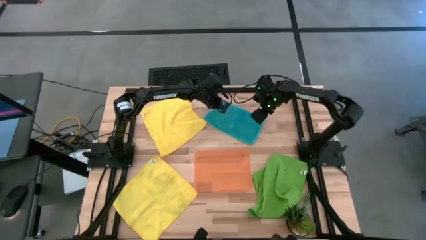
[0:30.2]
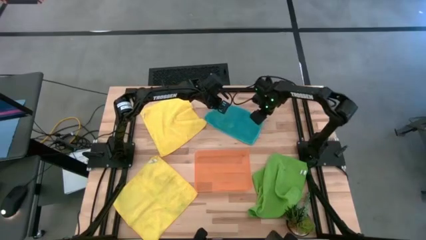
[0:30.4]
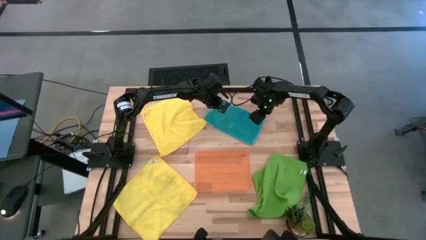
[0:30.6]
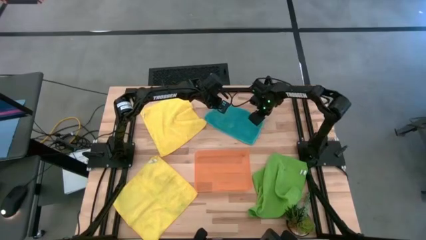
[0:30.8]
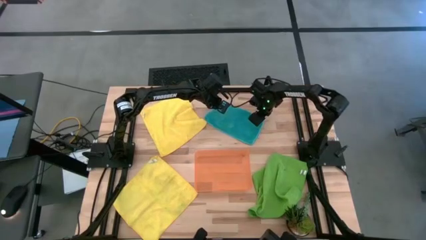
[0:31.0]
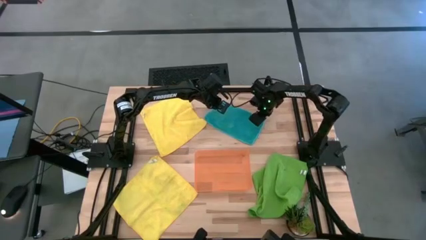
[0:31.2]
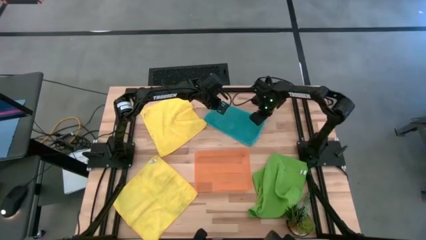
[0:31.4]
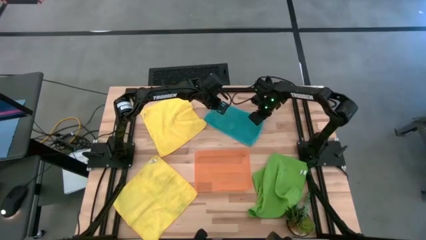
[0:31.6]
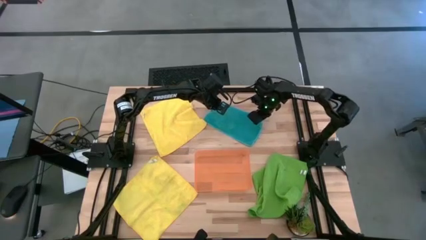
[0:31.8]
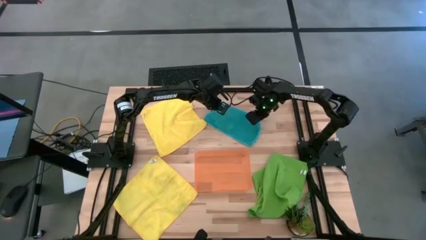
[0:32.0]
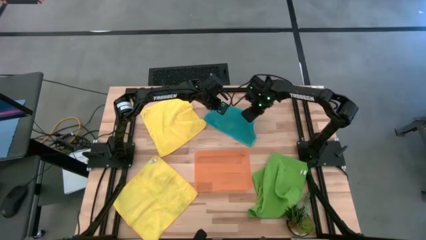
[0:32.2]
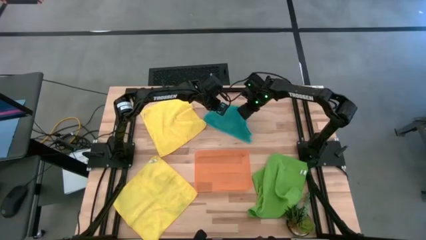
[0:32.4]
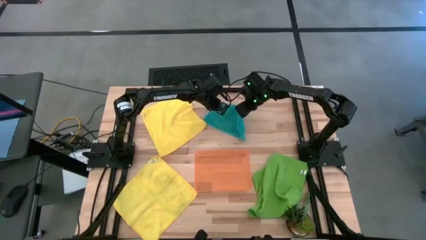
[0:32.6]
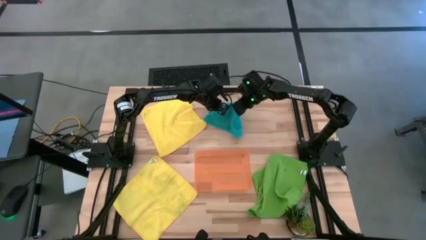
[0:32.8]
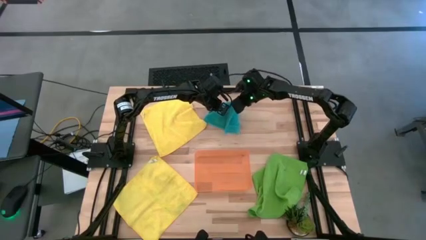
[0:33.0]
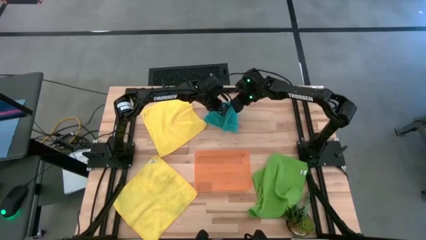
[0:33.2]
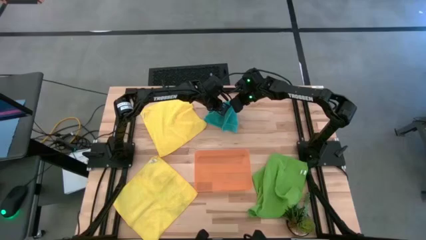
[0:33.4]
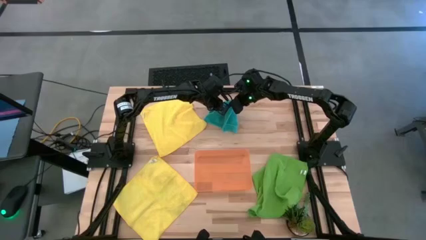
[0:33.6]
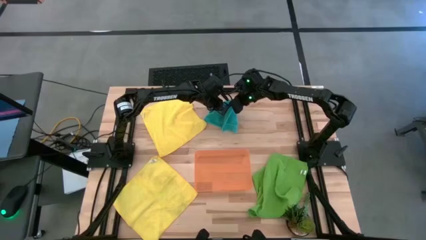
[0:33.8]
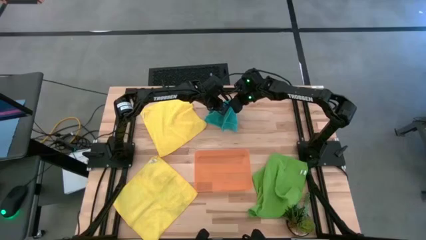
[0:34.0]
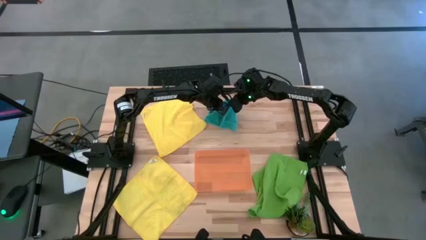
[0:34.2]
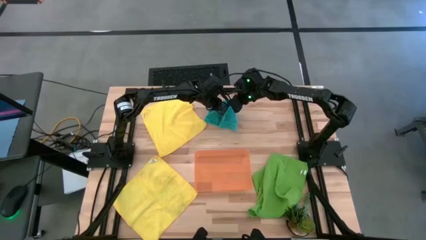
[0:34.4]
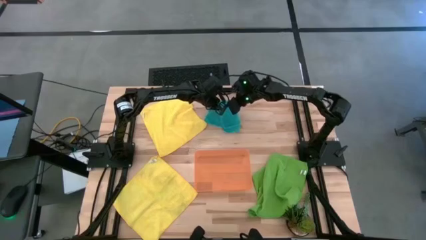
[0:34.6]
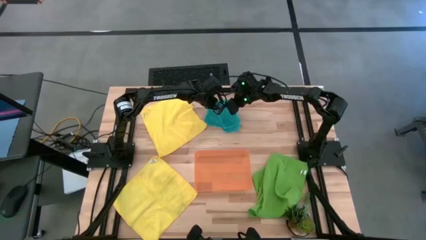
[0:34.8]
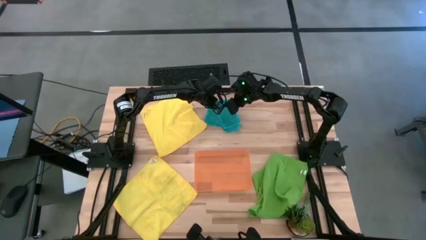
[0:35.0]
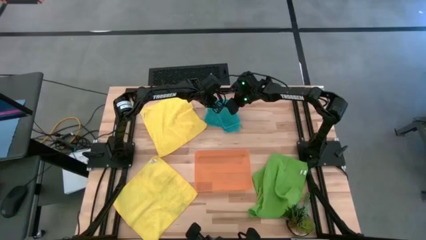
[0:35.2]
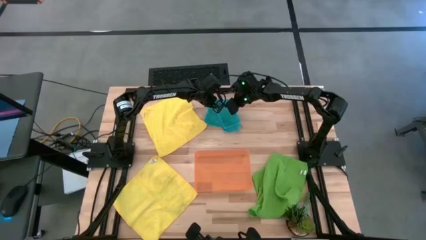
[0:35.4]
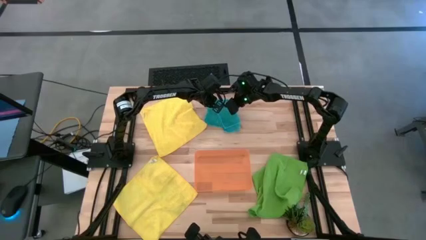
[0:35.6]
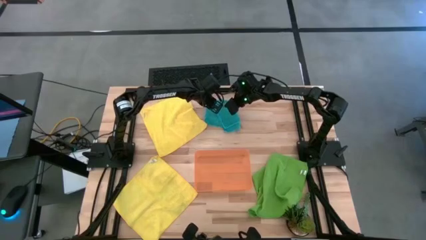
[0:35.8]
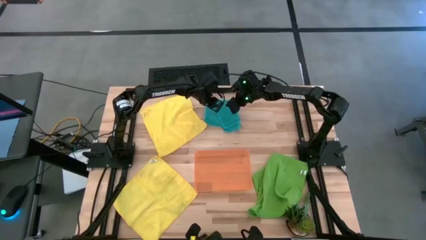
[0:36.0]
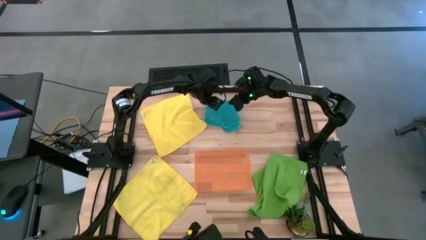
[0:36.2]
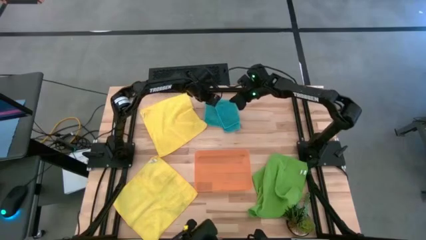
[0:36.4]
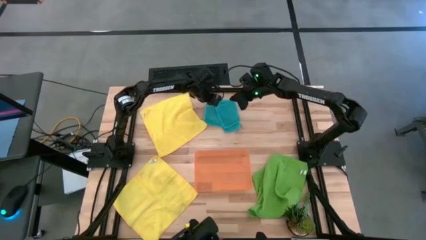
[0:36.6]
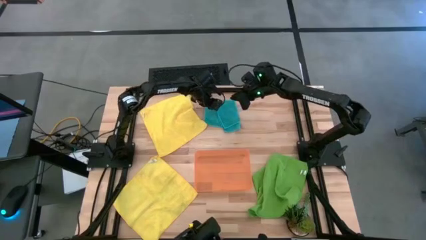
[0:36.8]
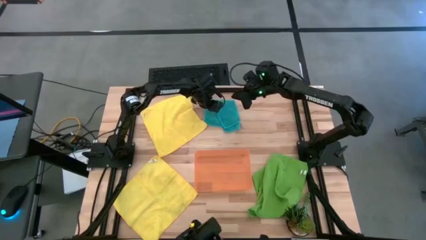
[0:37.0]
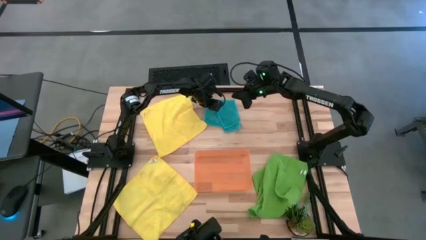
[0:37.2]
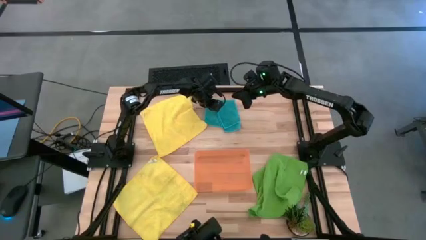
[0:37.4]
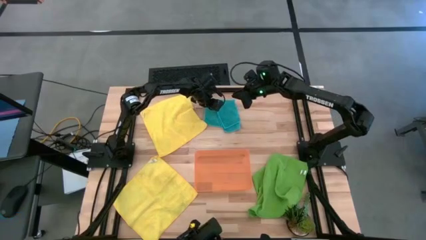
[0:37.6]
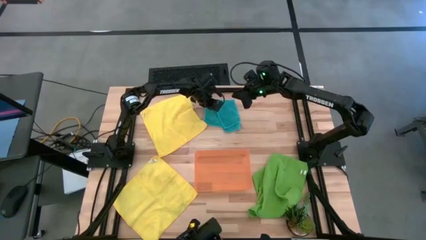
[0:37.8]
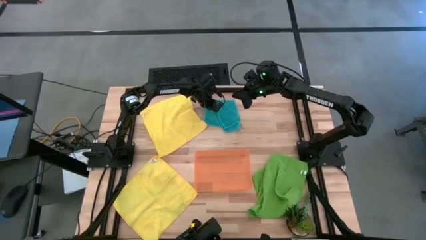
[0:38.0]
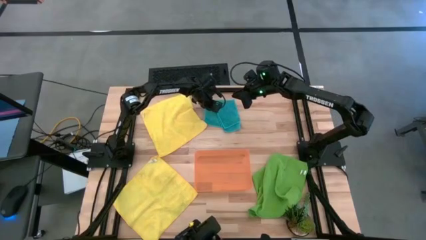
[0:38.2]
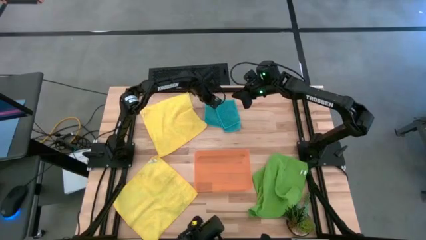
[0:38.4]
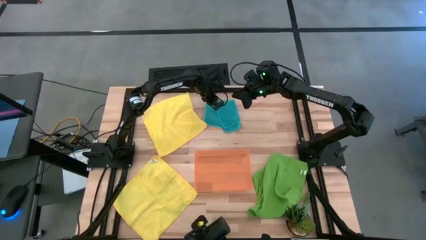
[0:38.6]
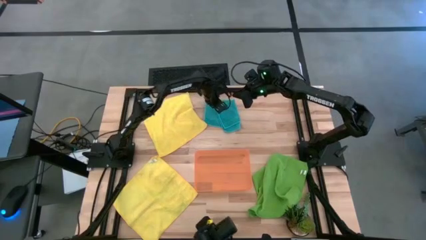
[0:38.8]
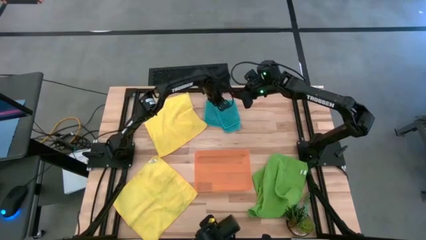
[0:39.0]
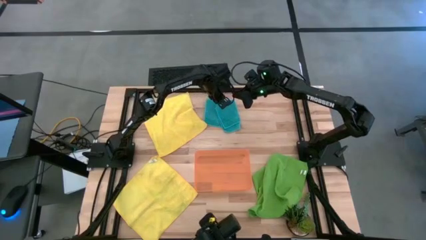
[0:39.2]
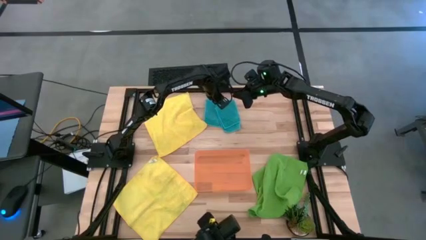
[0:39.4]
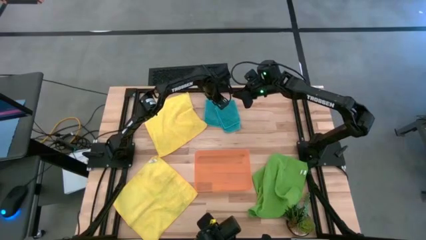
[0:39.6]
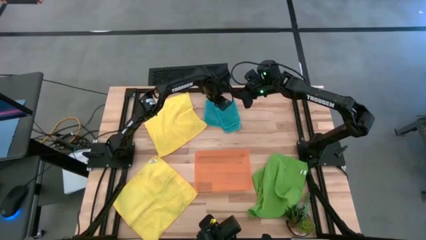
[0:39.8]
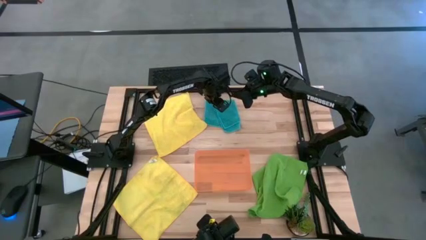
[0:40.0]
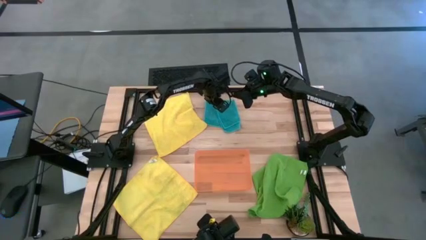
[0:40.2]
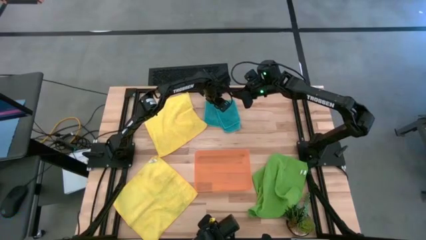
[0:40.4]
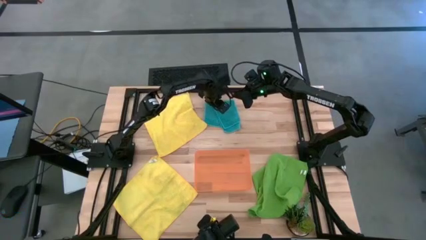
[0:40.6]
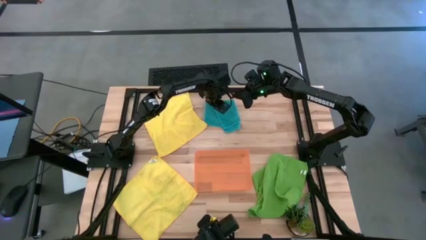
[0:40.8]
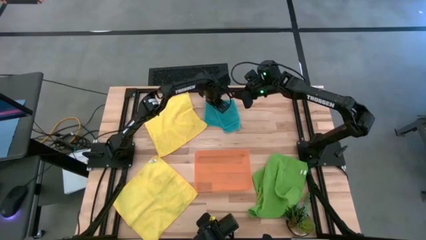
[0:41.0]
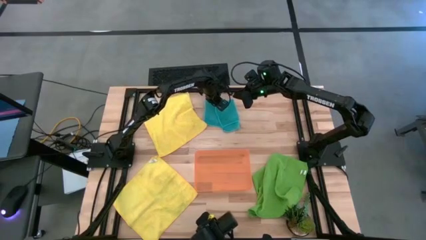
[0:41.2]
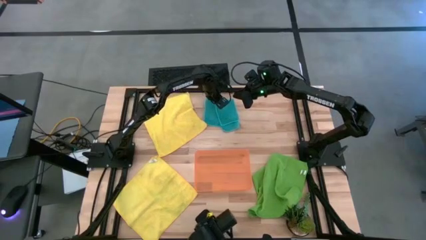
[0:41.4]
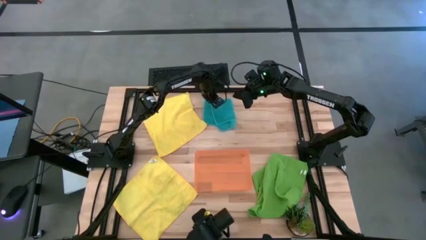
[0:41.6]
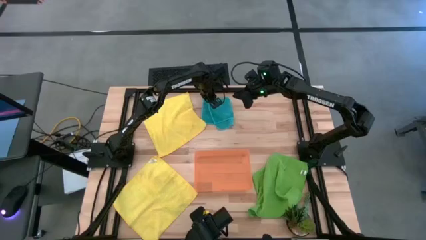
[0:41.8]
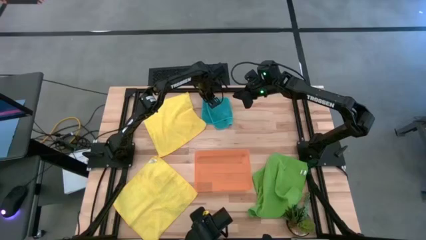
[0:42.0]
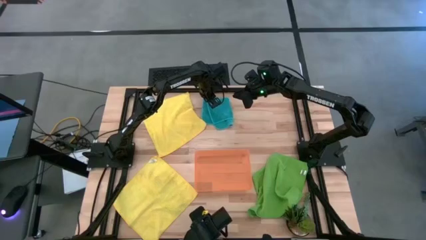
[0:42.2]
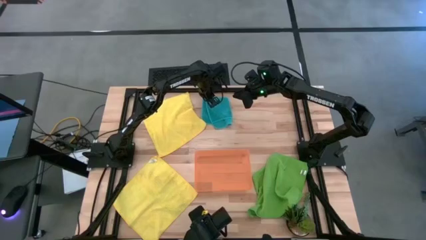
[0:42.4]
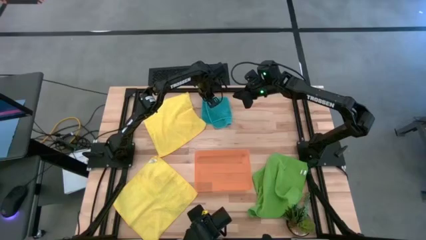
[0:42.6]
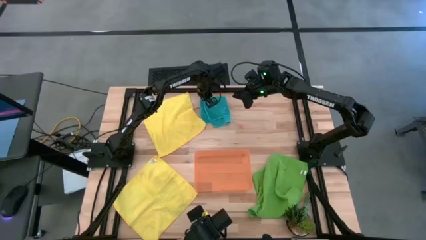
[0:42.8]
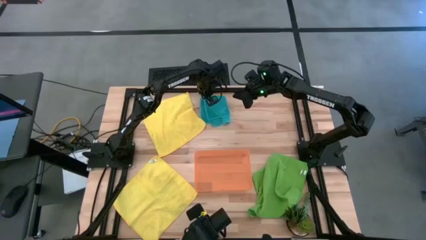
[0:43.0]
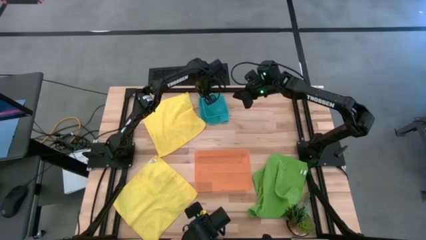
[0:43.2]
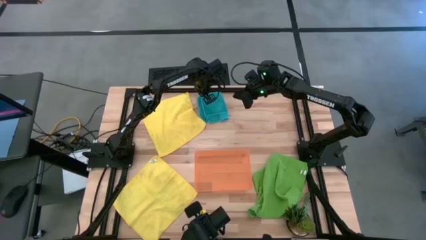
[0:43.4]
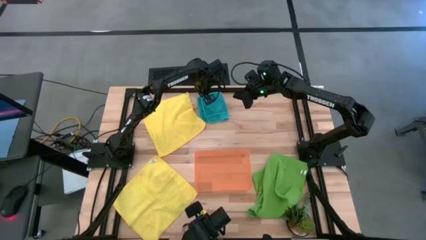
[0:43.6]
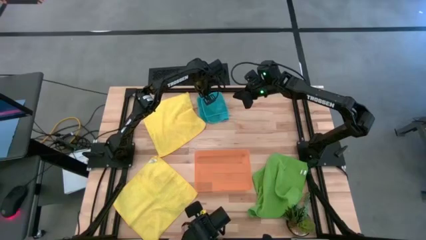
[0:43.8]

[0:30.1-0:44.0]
Task: Fold microfiber towels
Fold the blue towel
